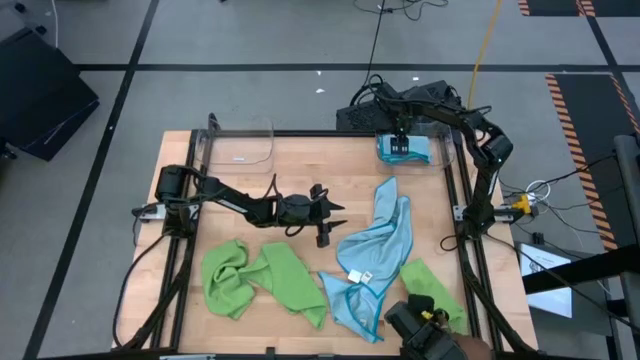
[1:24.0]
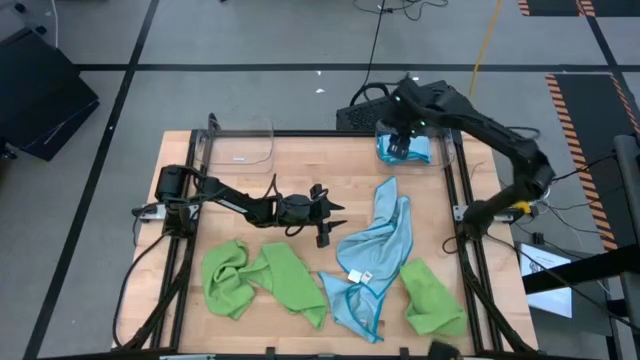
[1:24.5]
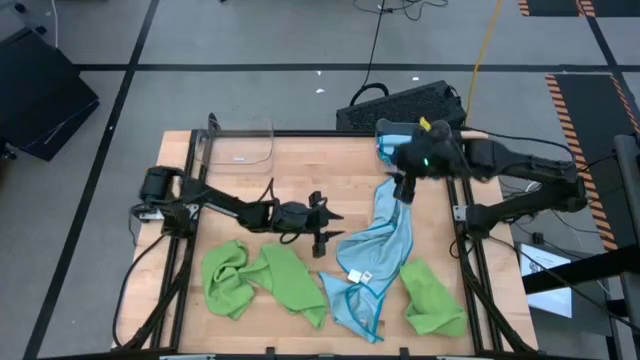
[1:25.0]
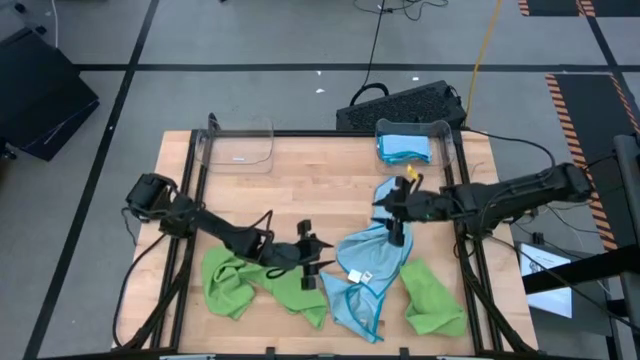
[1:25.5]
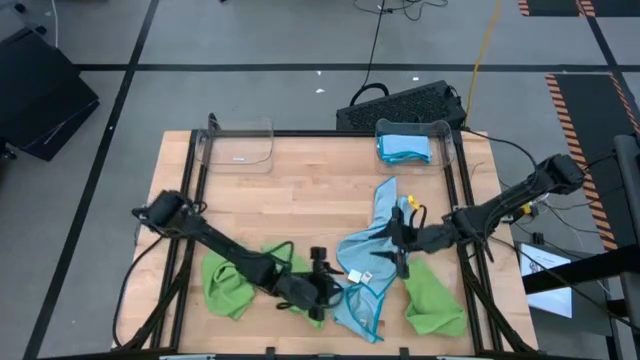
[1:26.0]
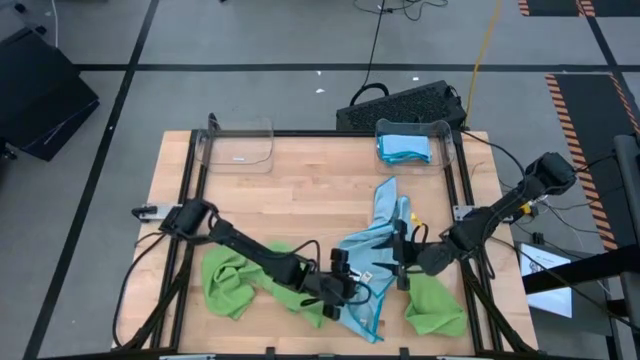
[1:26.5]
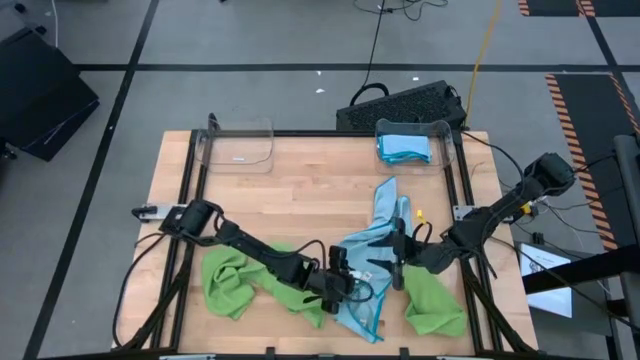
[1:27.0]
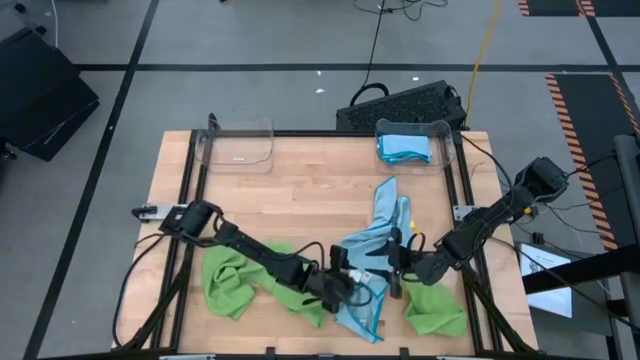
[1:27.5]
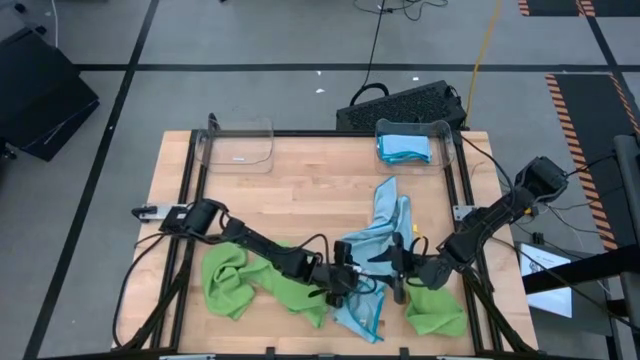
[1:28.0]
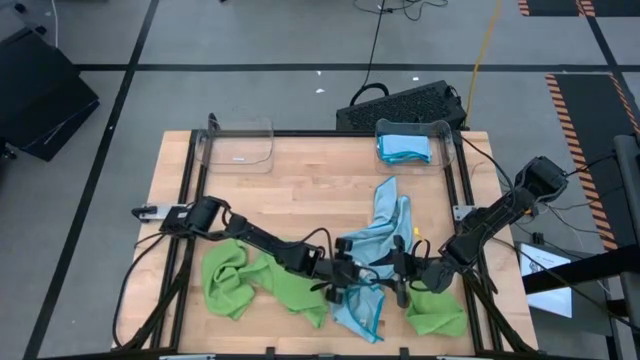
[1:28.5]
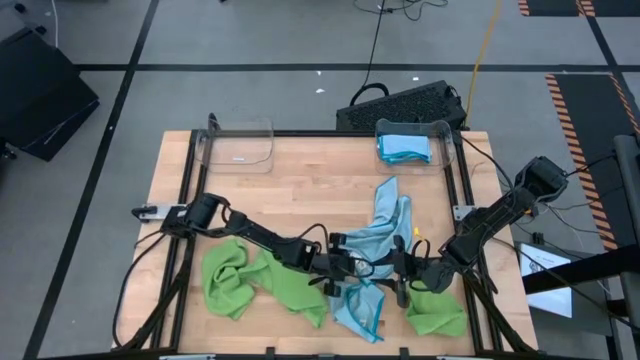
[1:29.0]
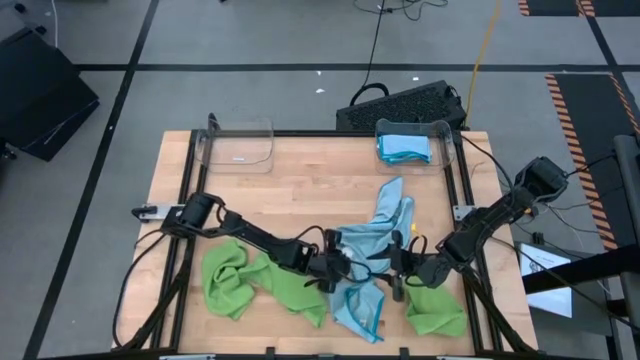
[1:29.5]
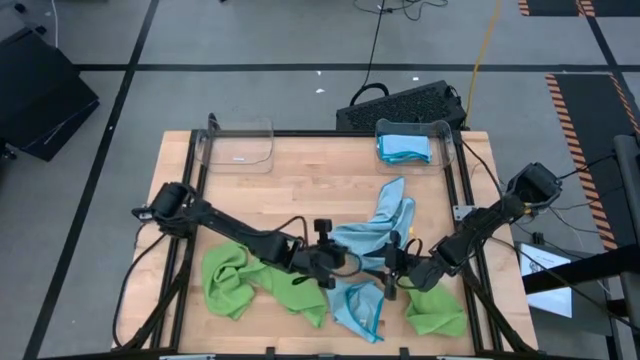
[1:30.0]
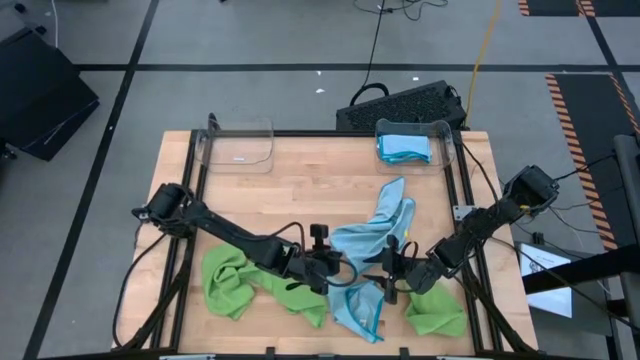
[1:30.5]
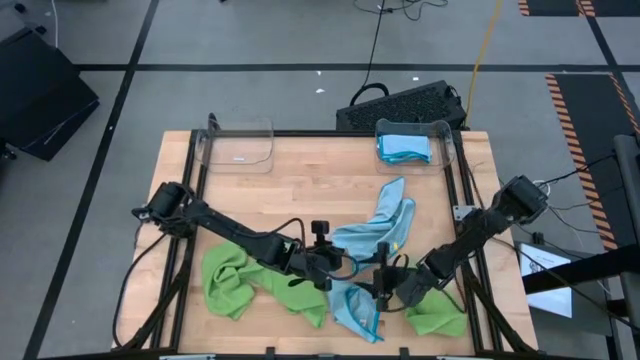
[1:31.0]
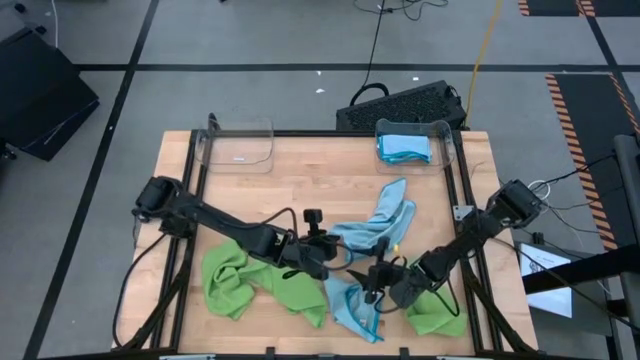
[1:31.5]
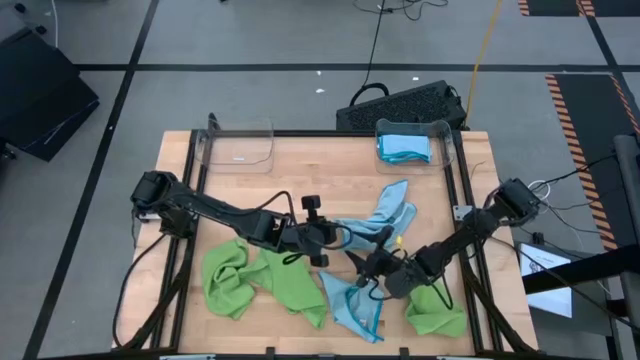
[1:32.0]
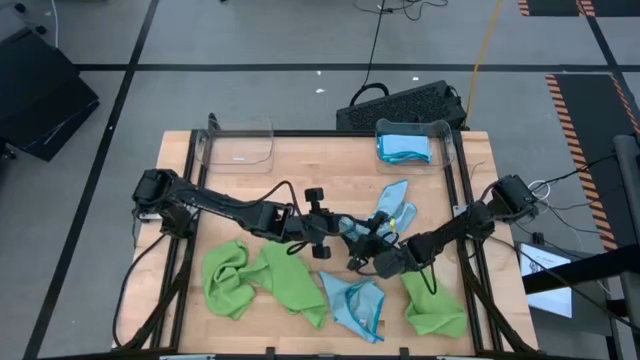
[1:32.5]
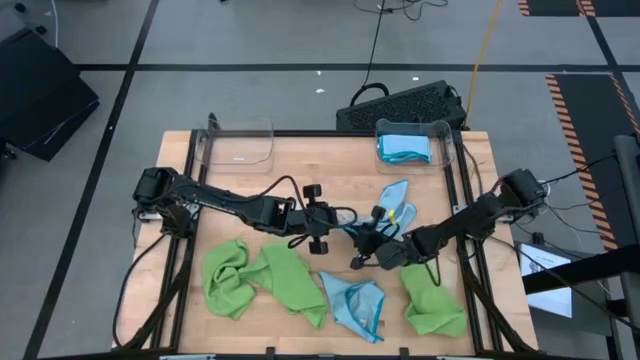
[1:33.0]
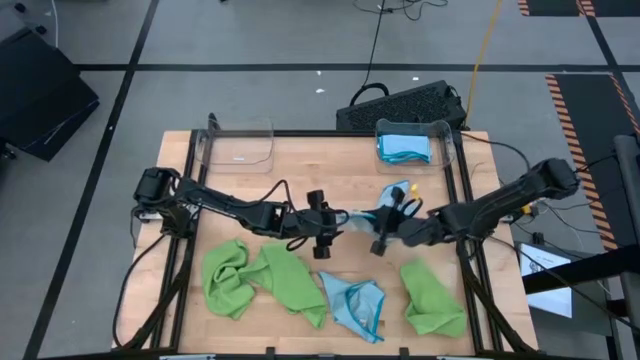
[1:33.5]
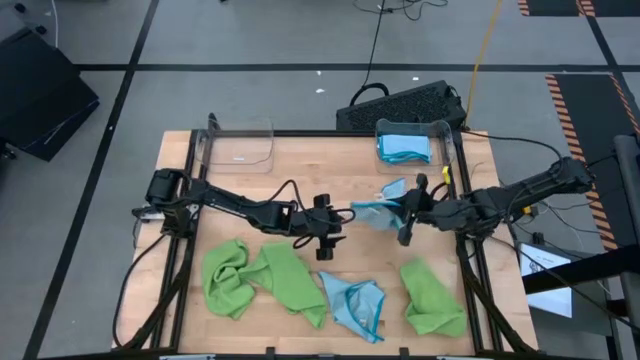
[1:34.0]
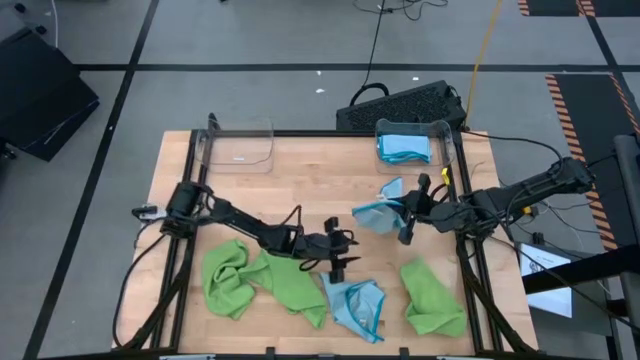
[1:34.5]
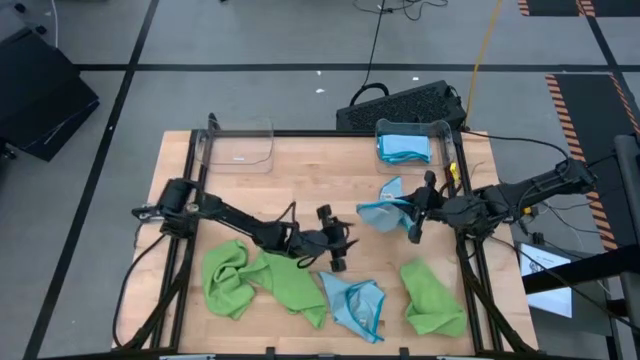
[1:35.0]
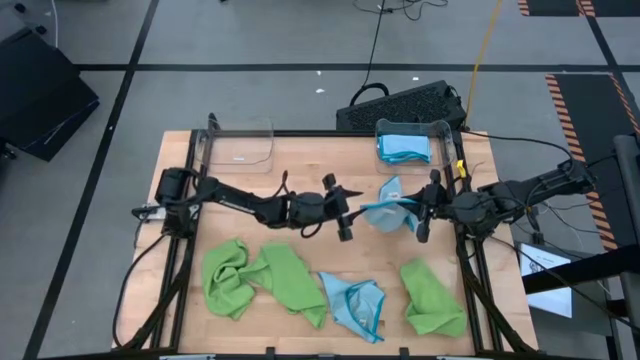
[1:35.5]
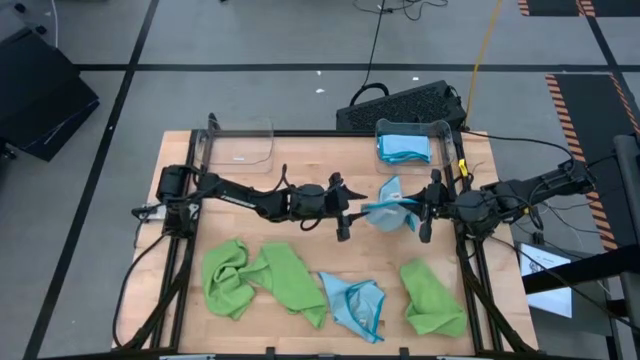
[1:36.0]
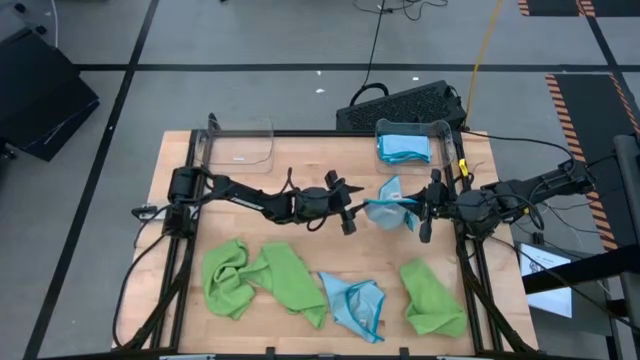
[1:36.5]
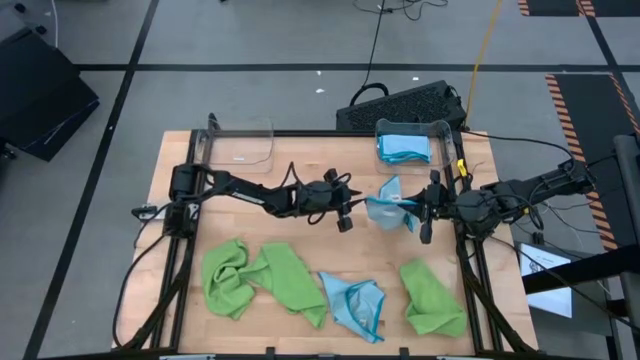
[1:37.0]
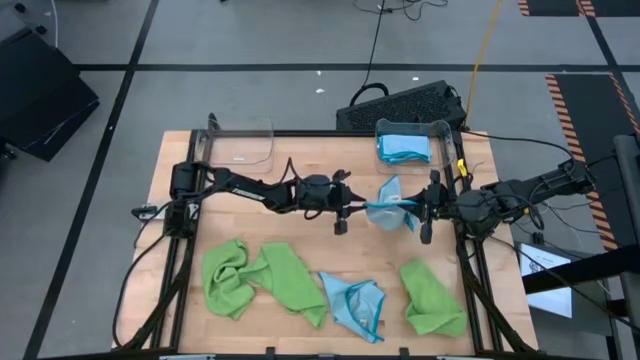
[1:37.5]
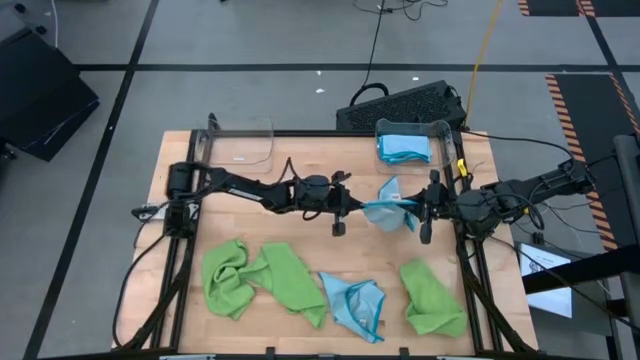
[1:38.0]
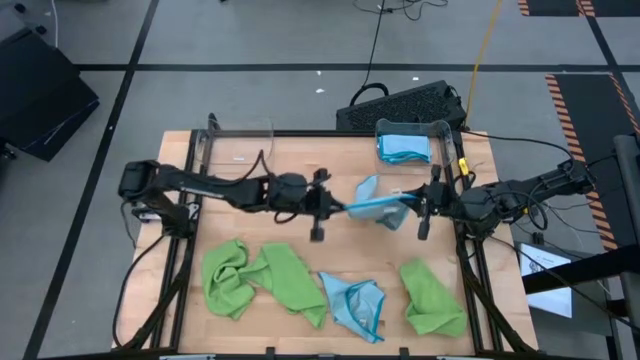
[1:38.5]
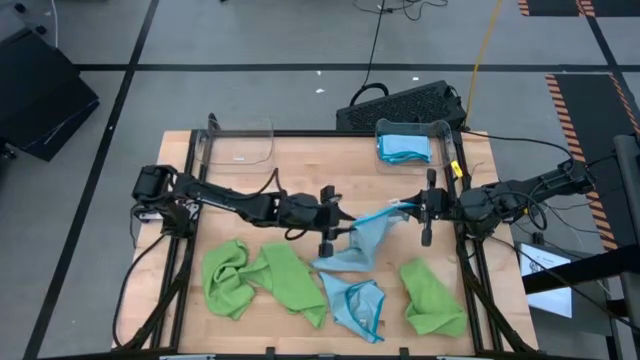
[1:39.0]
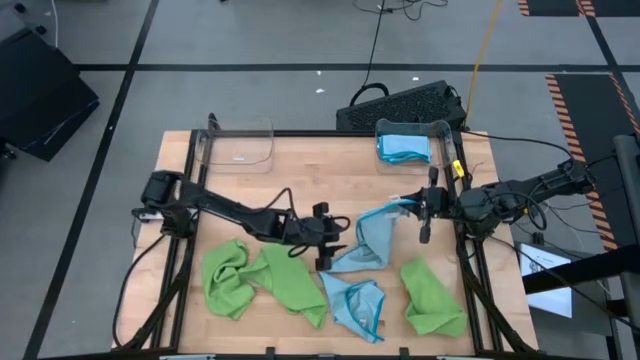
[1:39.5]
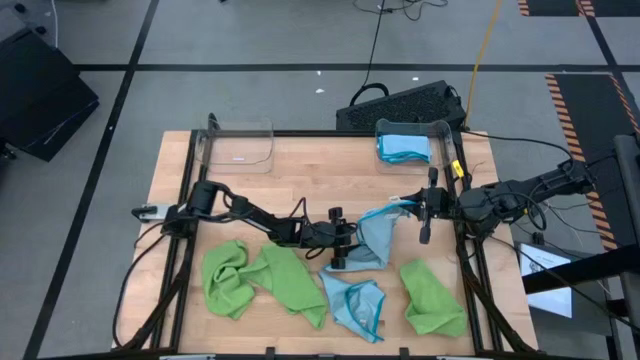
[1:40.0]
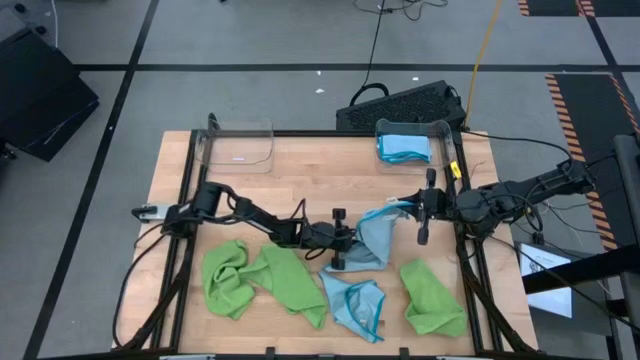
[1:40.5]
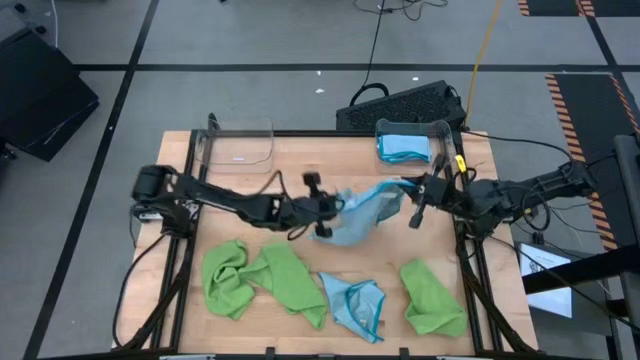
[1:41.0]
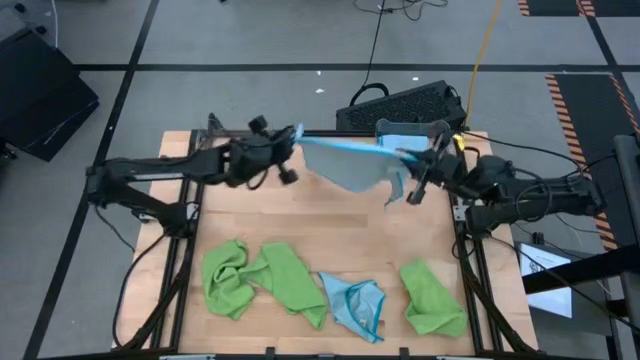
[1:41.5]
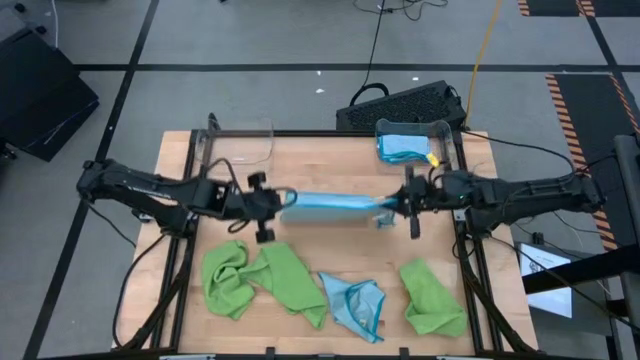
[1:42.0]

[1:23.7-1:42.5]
Task: Fold microfiber towels
Fold the top blue microfiber cloth

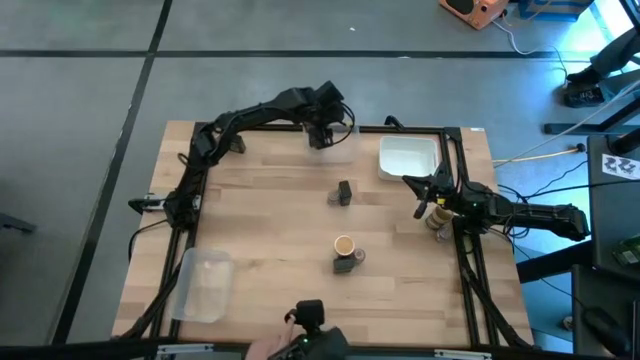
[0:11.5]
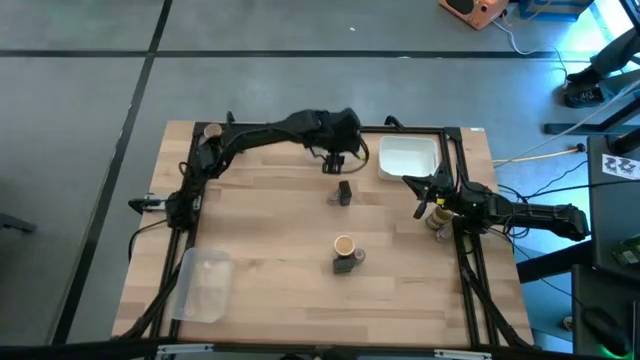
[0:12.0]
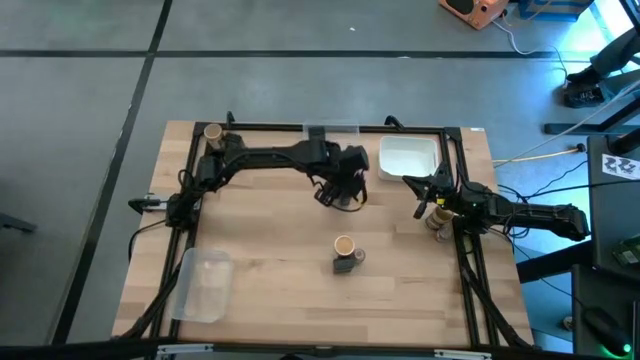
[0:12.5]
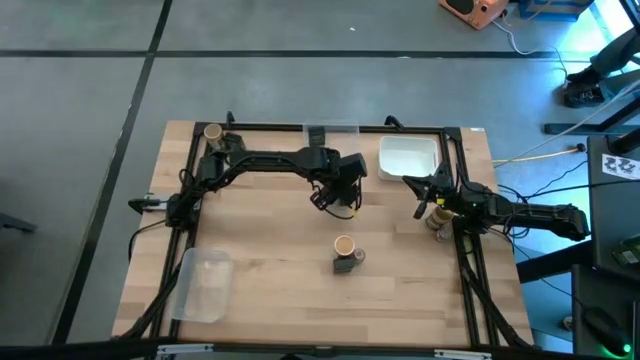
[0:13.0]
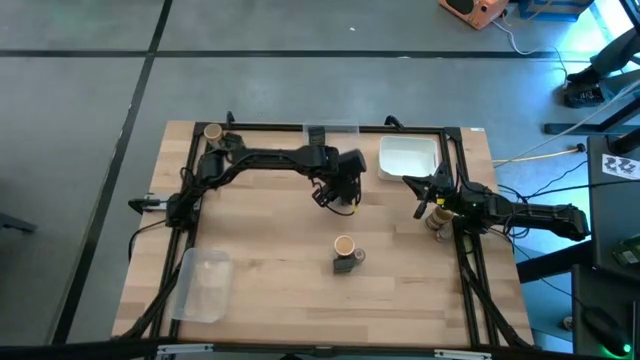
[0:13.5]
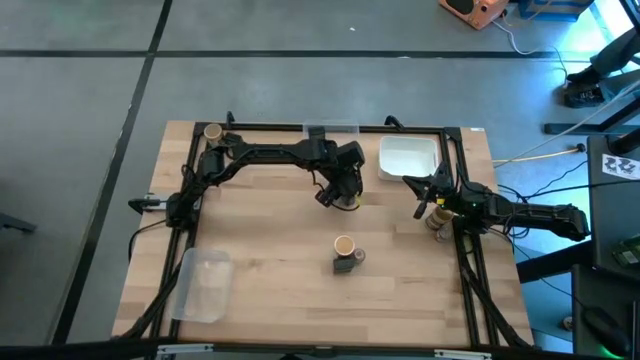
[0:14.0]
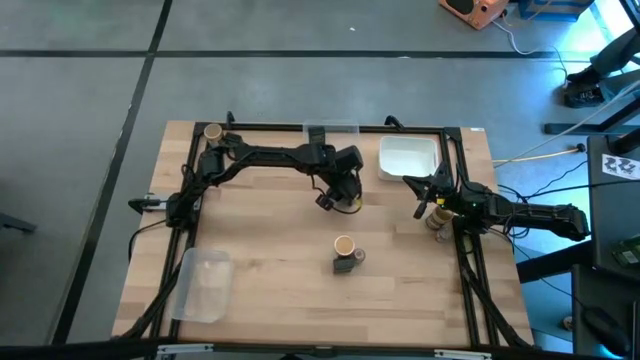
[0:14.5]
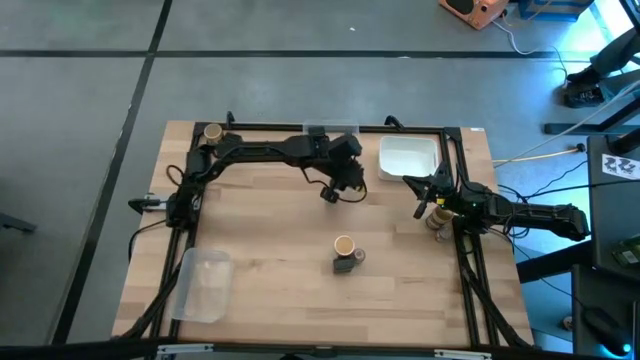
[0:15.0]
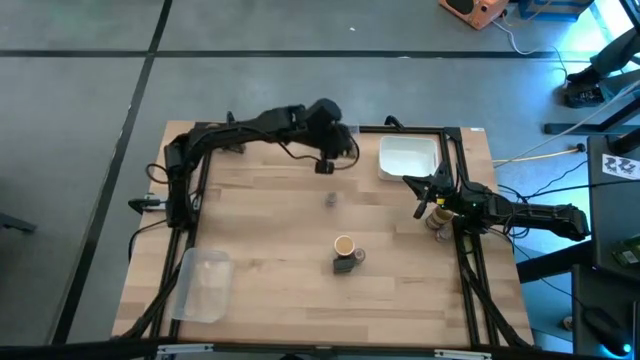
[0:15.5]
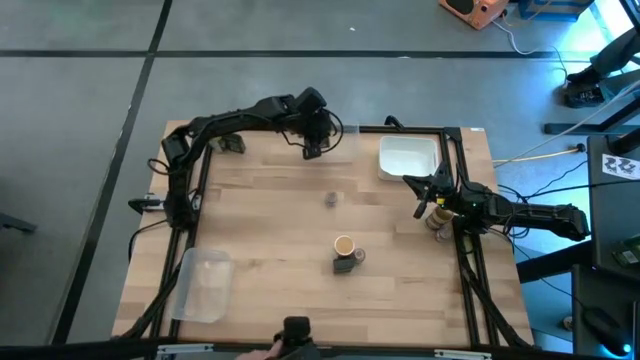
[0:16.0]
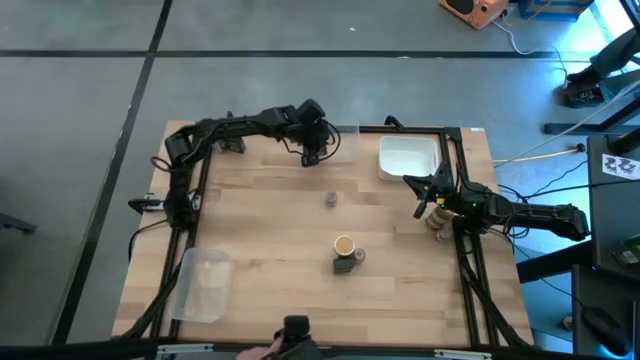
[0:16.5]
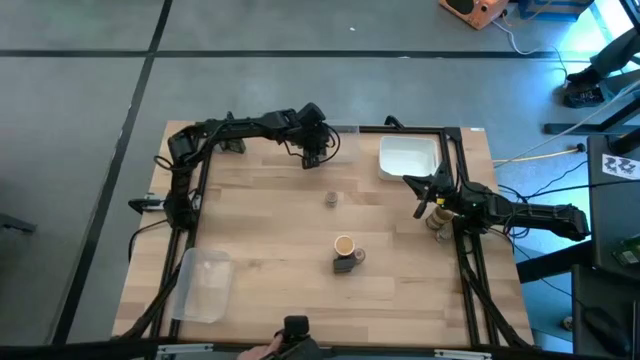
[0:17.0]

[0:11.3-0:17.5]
Task: Sort spices by type
Put the center black seasoning can into the top transparent bin
